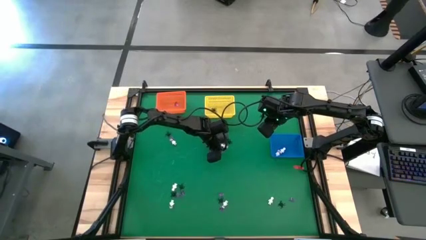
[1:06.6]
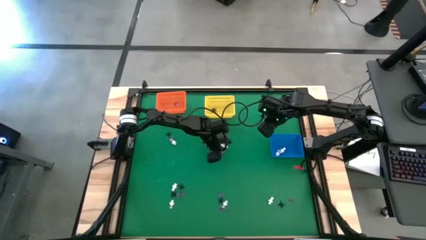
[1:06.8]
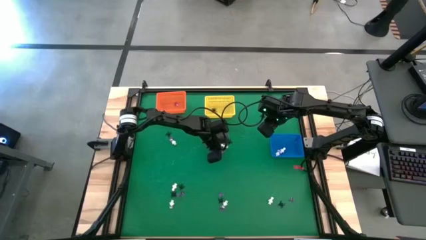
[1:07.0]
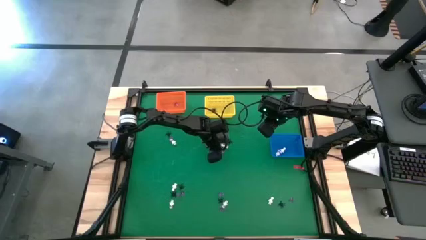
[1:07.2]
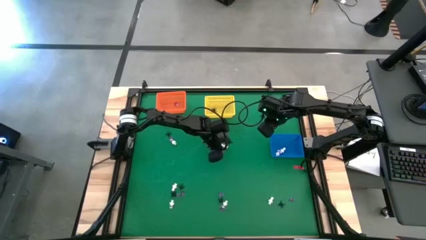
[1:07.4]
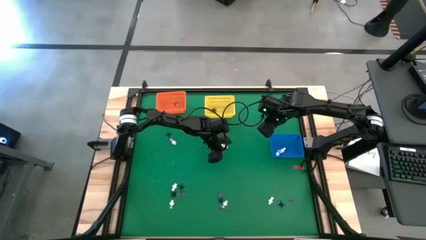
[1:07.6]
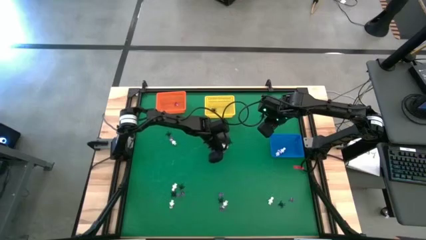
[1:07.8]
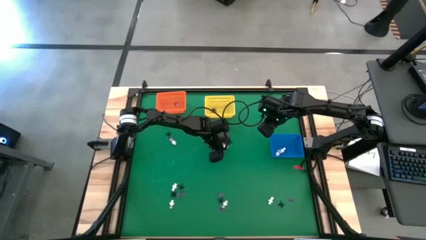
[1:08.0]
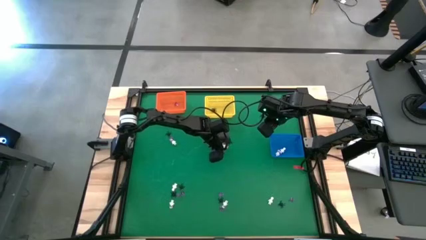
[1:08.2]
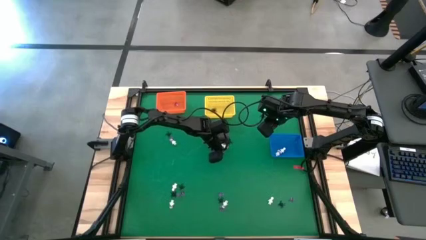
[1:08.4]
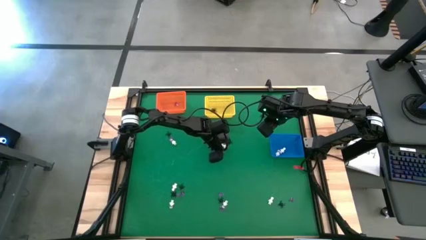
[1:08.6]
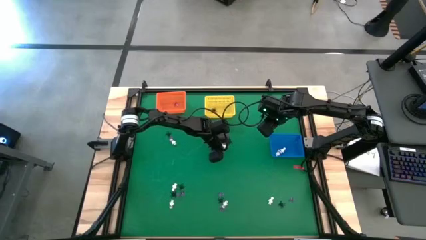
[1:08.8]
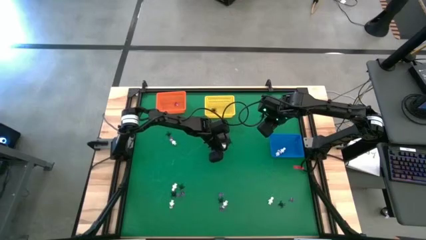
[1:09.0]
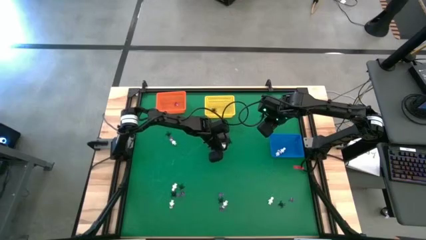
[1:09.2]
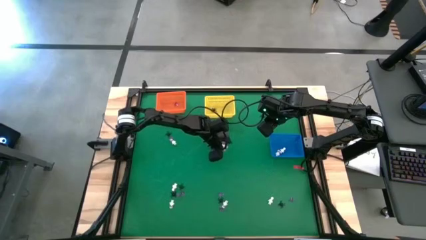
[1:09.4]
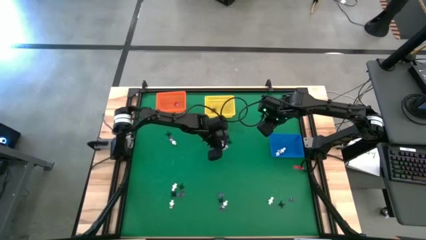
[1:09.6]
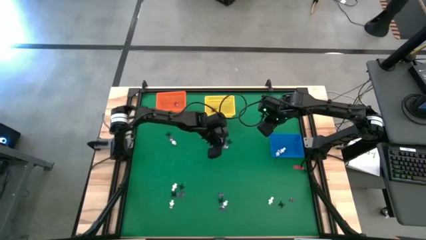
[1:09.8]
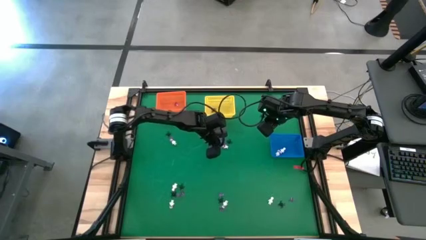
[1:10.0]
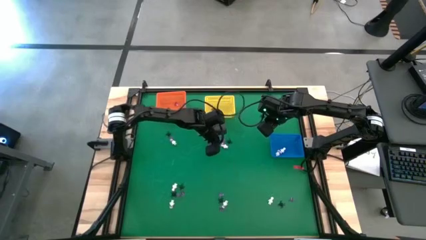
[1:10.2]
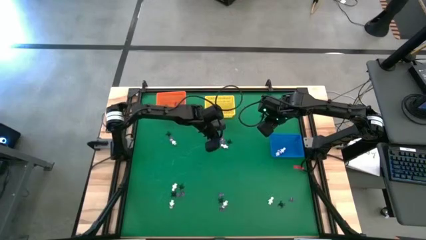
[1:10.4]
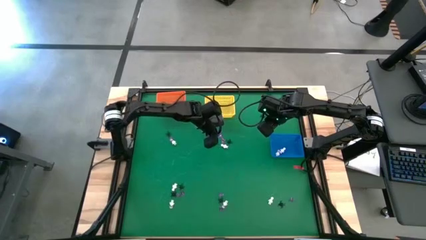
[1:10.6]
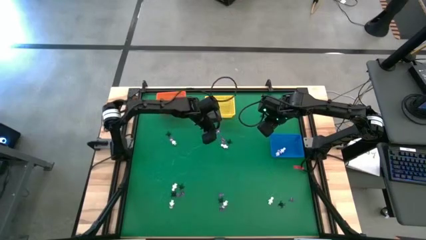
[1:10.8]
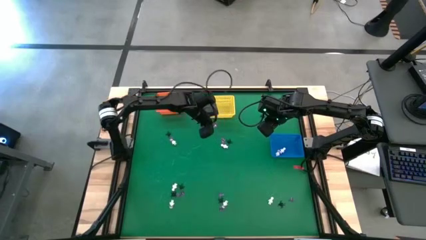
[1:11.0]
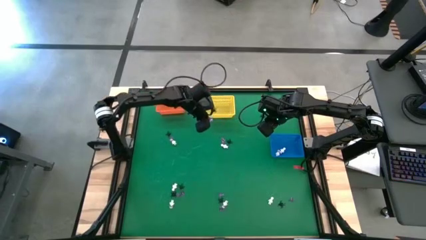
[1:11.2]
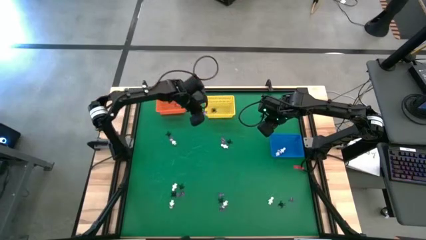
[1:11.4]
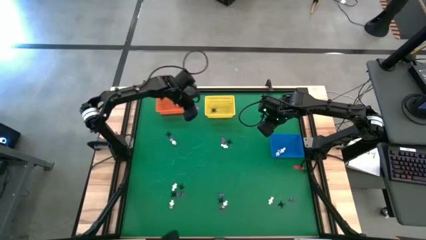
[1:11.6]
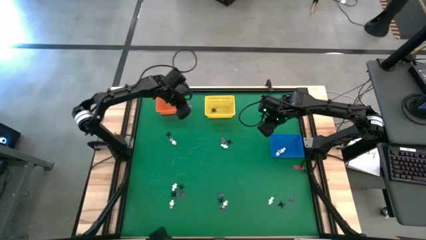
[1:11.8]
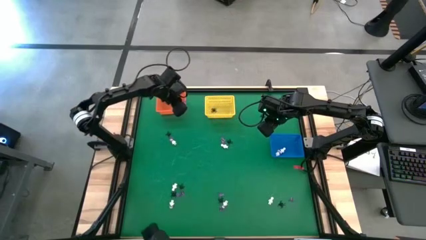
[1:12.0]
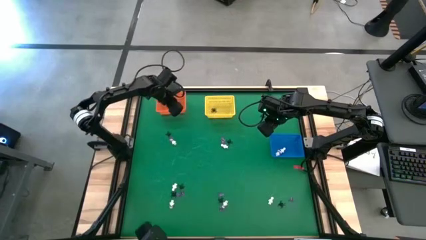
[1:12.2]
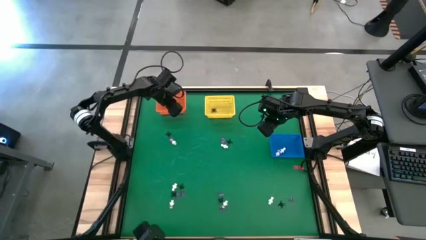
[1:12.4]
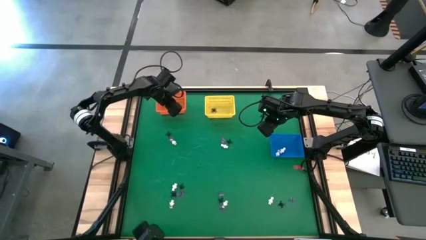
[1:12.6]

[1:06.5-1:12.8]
Task: Sort Halloween decoration
Put the violet hat toy into the orange basket

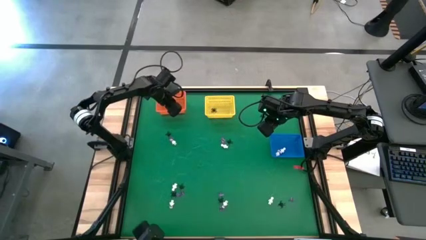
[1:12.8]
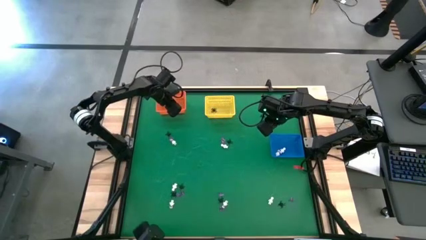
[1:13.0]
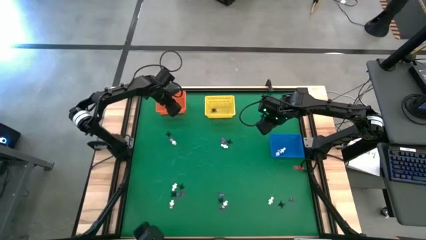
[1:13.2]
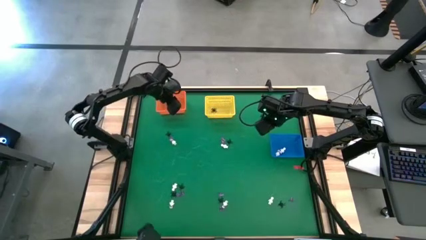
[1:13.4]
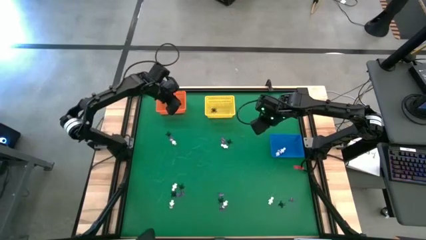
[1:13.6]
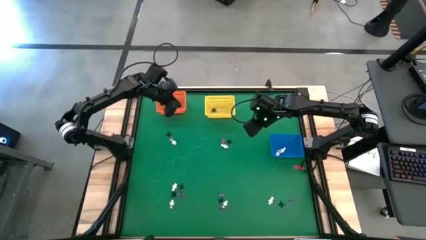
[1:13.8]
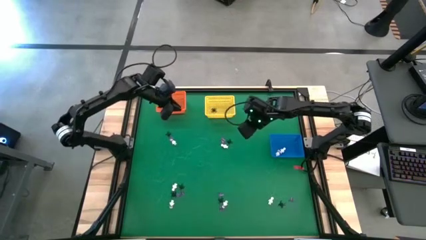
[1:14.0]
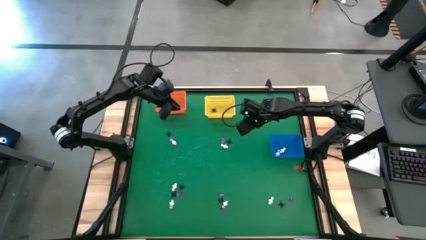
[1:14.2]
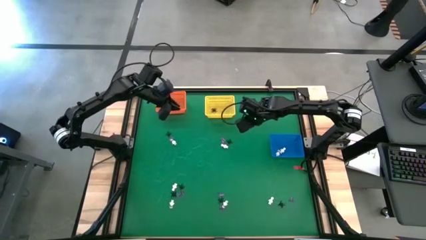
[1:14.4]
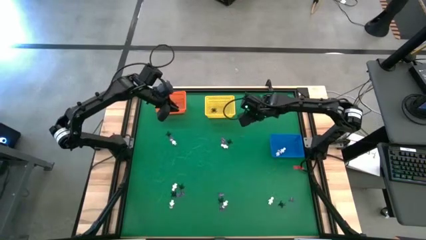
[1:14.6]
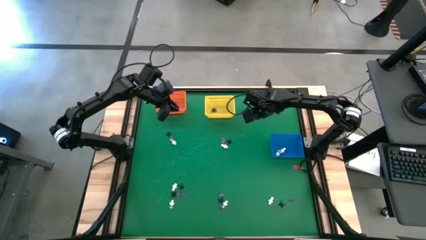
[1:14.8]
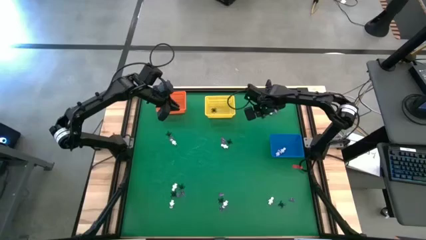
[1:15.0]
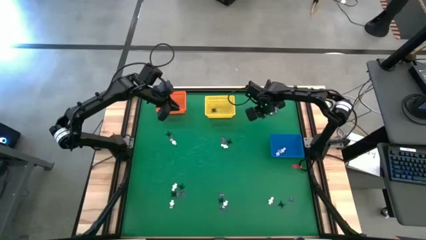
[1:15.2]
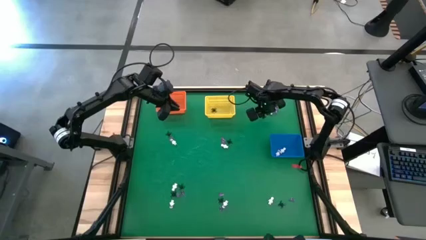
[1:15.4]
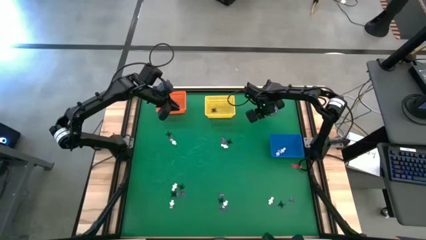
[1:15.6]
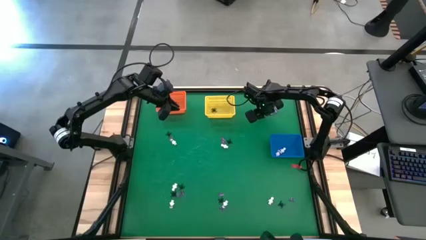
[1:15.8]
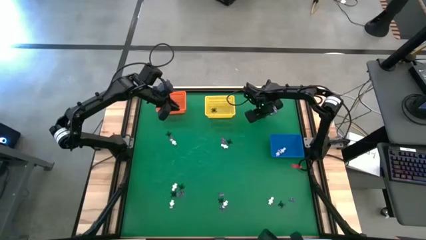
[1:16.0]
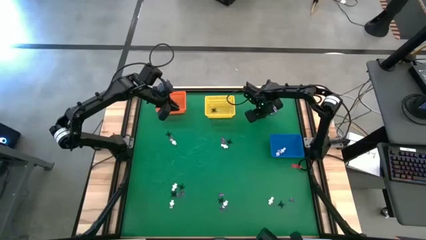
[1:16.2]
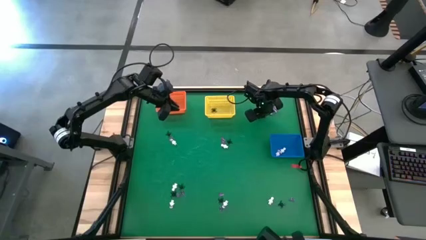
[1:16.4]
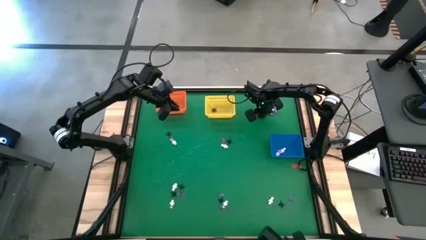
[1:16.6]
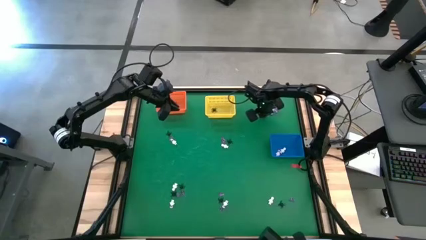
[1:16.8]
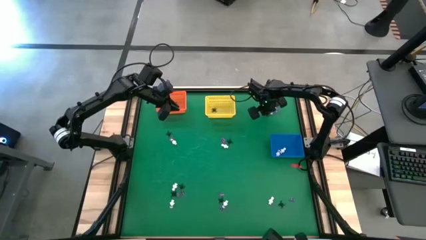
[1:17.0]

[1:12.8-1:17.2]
Put the black spider toy into the yellow basket

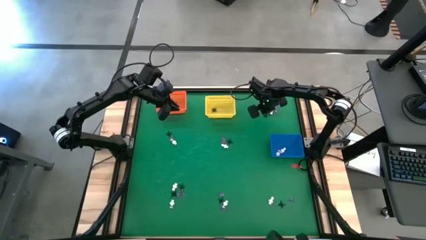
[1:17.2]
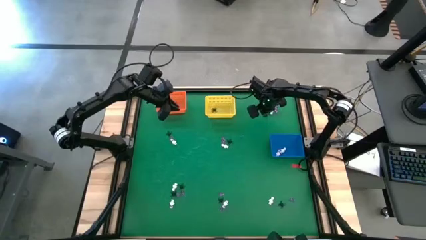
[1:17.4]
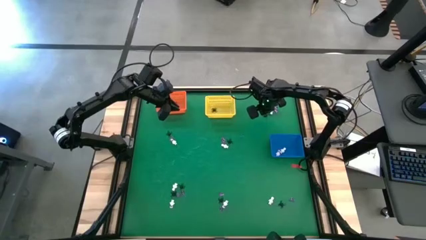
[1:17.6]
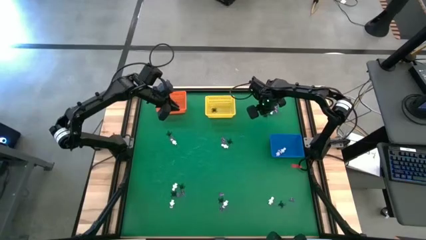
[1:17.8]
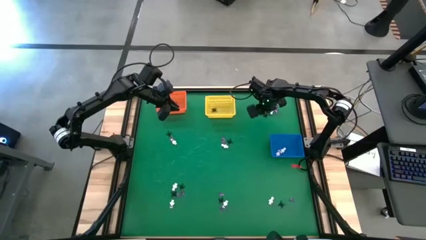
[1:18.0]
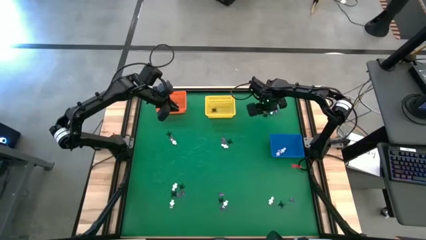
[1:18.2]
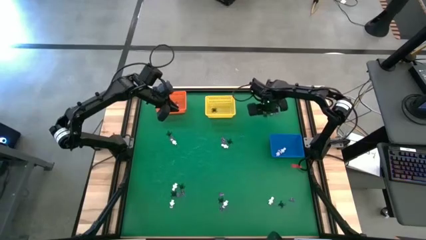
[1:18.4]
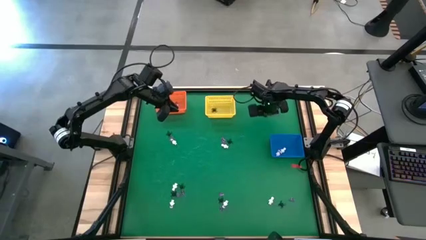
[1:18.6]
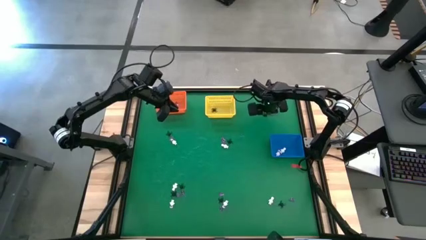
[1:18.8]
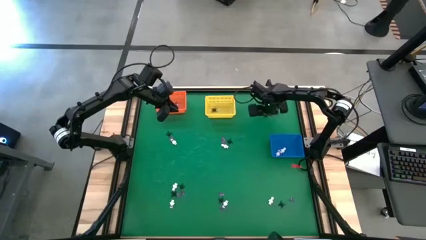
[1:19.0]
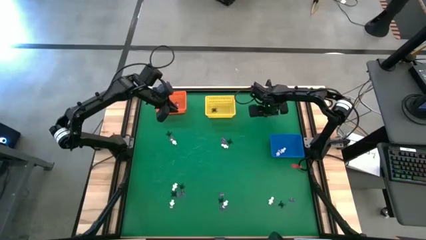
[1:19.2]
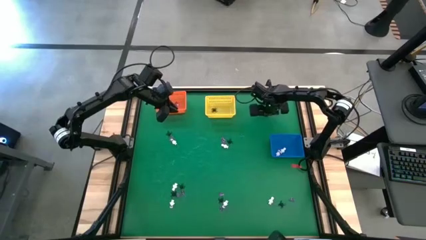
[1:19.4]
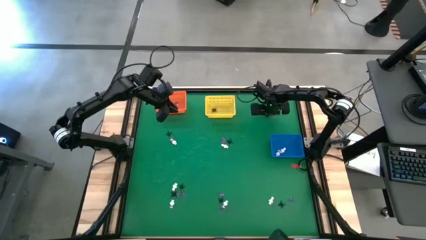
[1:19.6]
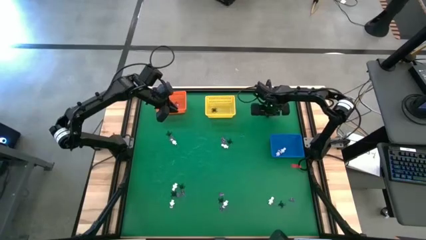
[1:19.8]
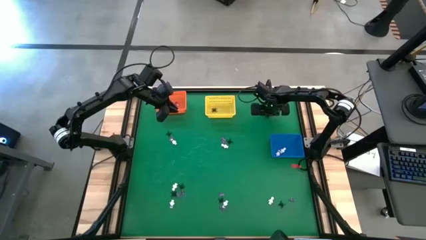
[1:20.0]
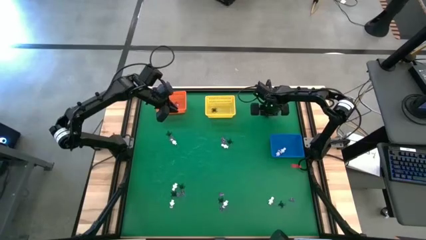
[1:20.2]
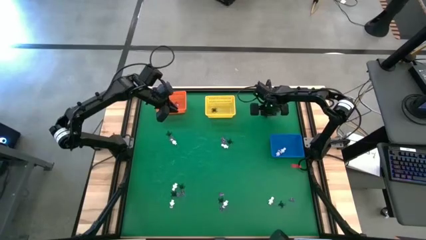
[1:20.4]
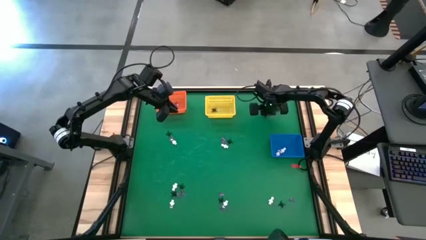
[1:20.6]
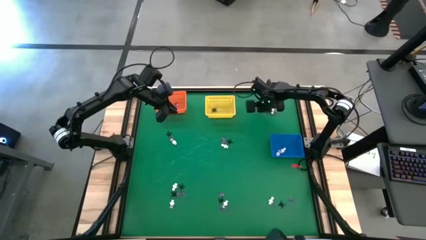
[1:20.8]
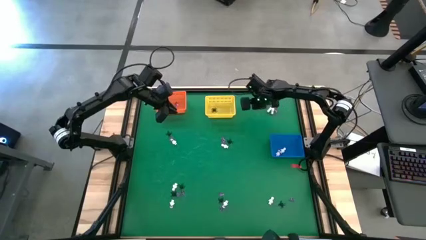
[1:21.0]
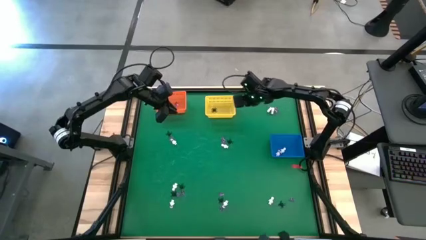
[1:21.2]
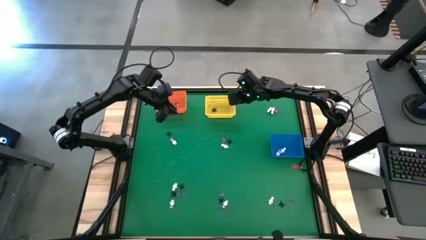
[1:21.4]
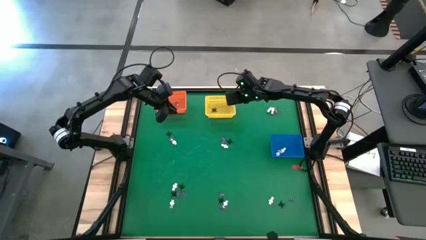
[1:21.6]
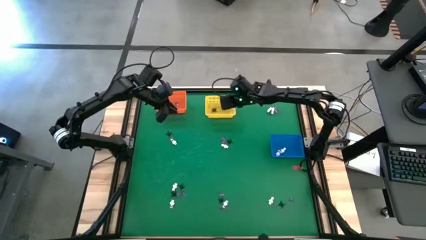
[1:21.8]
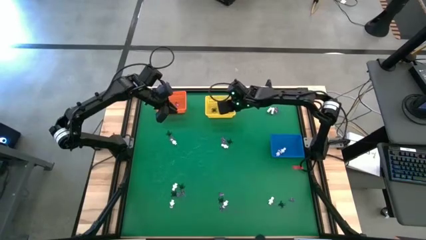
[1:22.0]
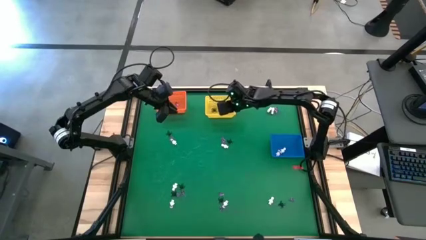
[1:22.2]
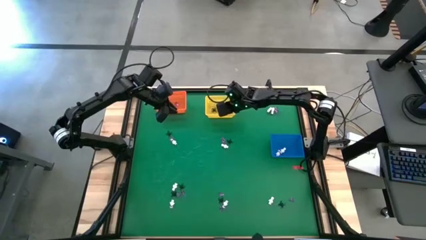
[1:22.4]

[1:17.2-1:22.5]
Put the black spider toy into the yellow basket

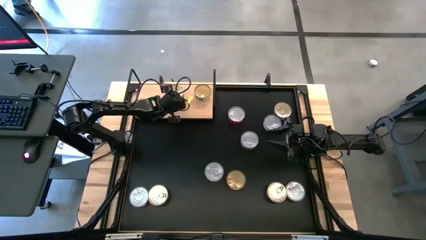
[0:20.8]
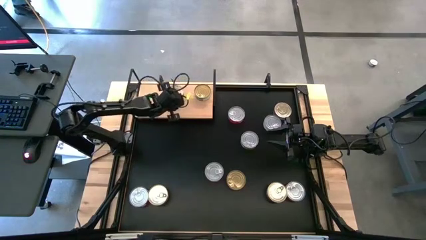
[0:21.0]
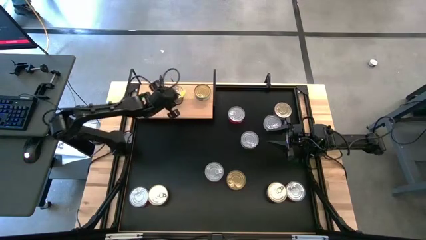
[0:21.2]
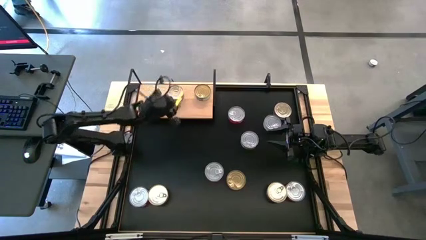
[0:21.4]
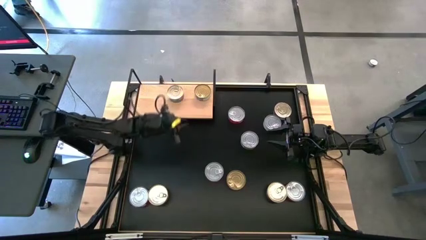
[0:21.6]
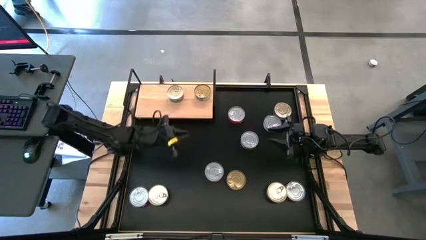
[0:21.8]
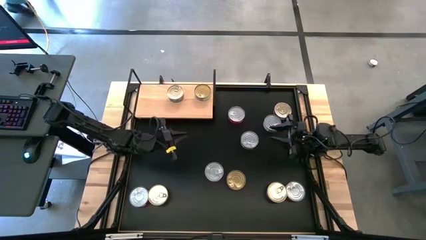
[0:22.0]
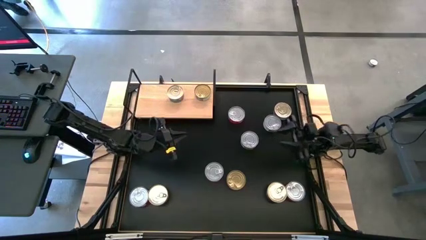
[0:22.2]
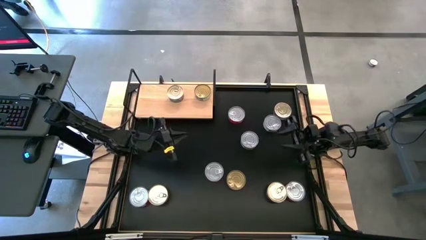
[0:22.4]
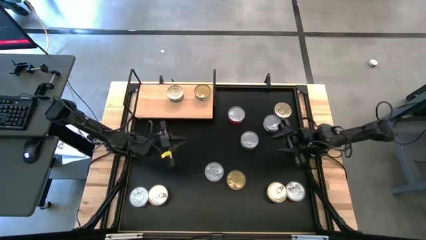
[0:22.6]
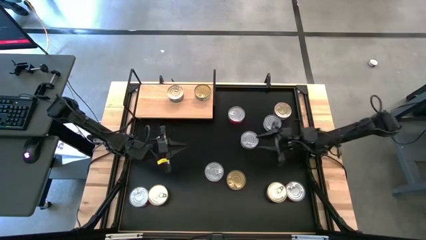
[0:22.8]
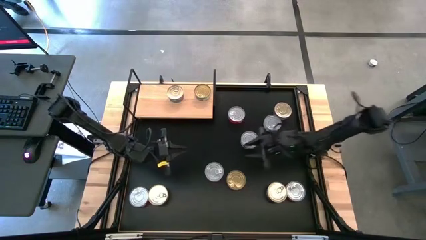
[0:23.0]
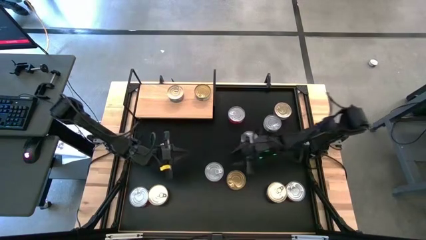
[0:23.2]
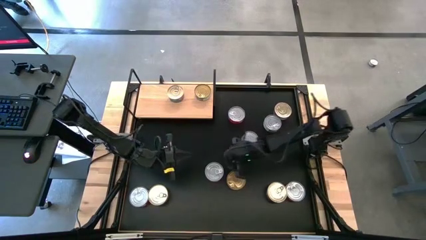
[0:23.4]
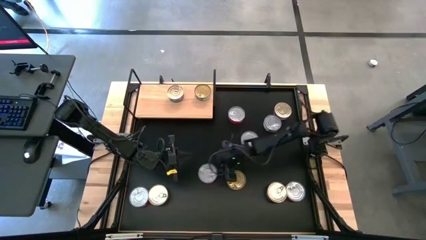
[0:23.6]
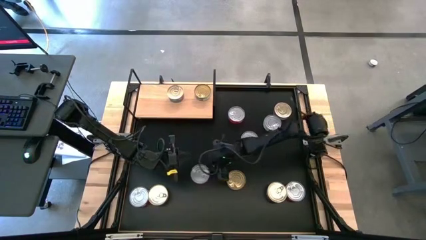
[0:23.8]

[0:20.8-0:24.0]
Task: Stack canned seafood by type on shelf
Put the red tuna can on the shelf
